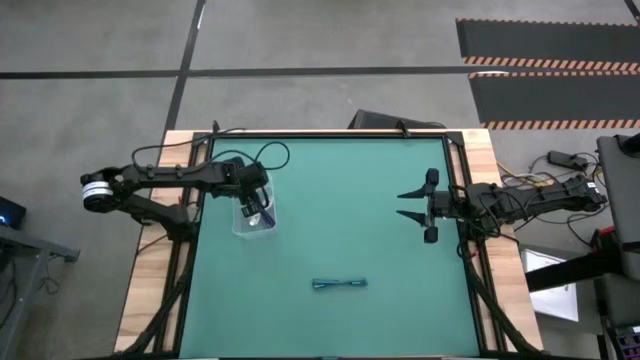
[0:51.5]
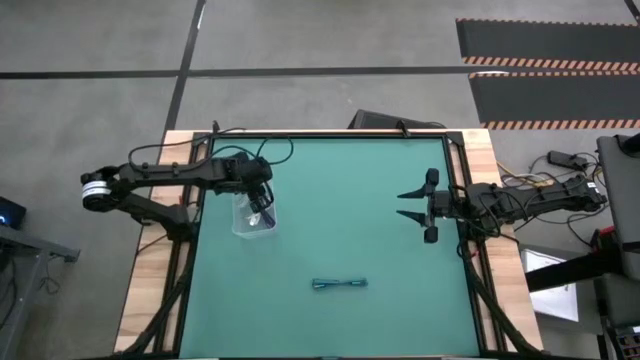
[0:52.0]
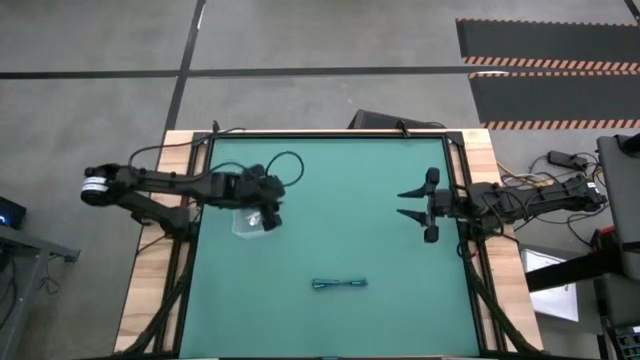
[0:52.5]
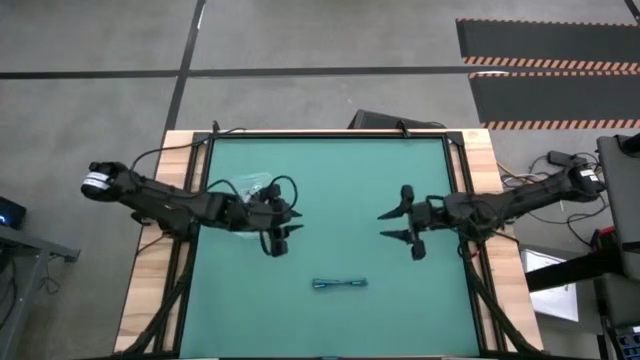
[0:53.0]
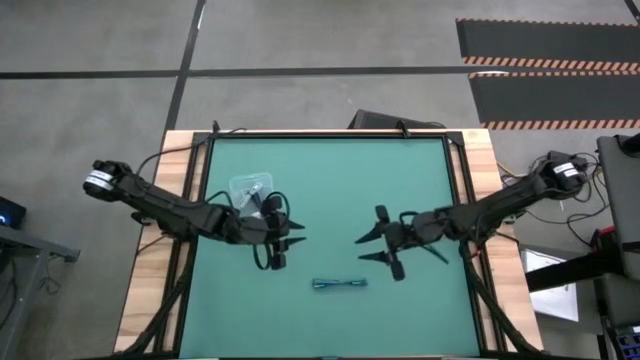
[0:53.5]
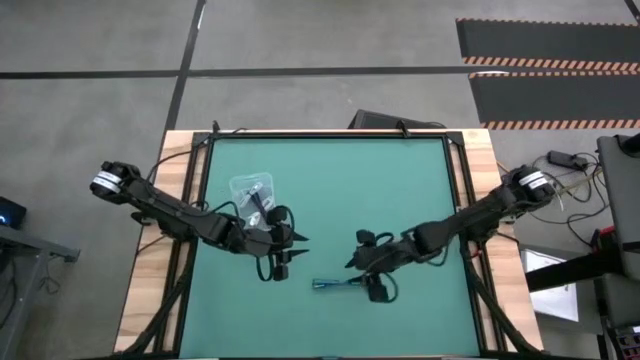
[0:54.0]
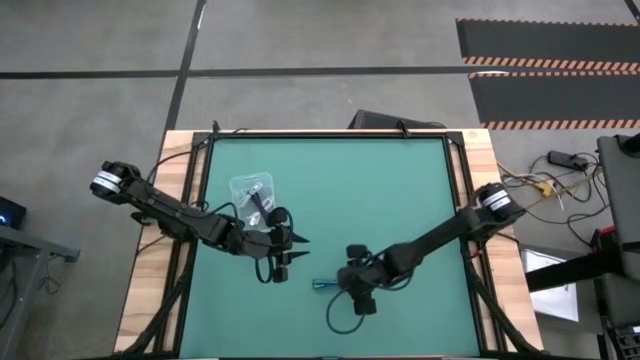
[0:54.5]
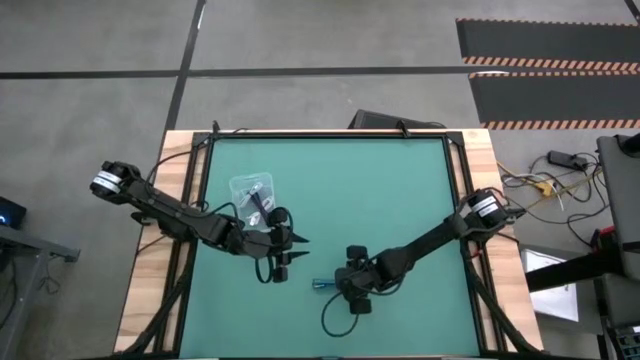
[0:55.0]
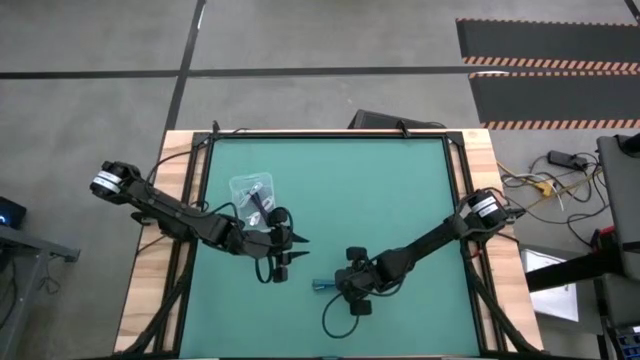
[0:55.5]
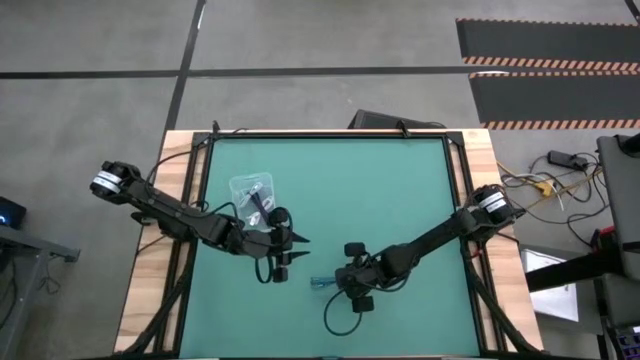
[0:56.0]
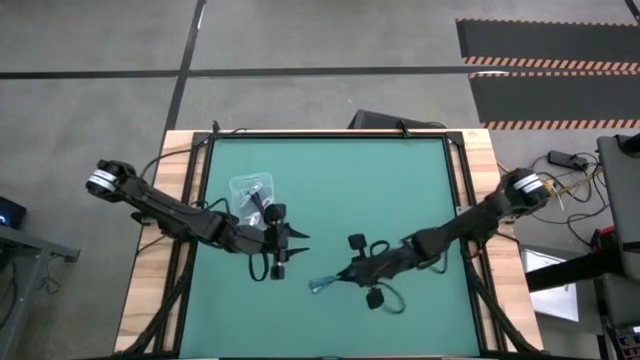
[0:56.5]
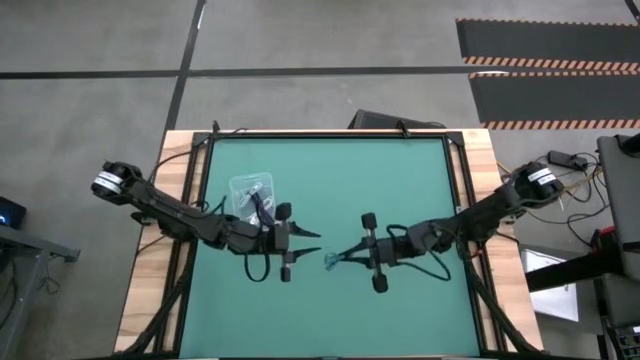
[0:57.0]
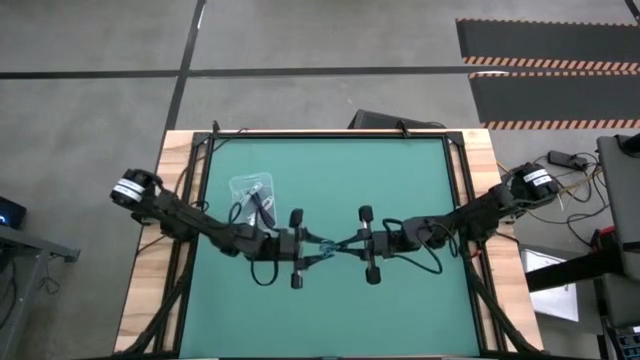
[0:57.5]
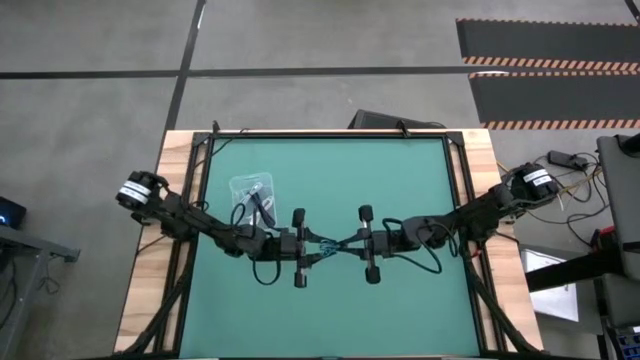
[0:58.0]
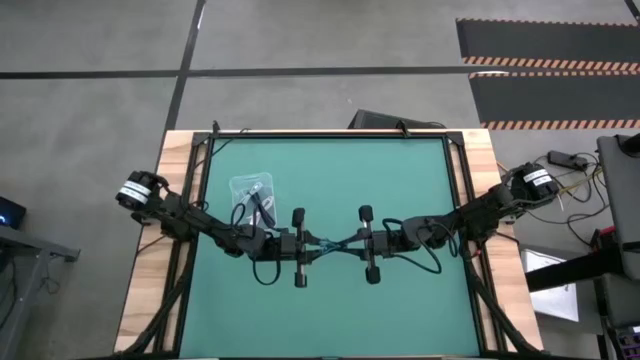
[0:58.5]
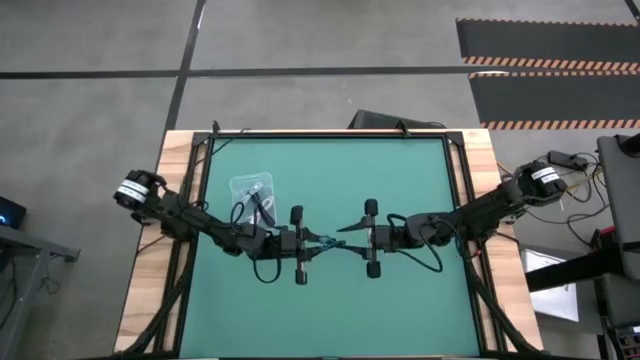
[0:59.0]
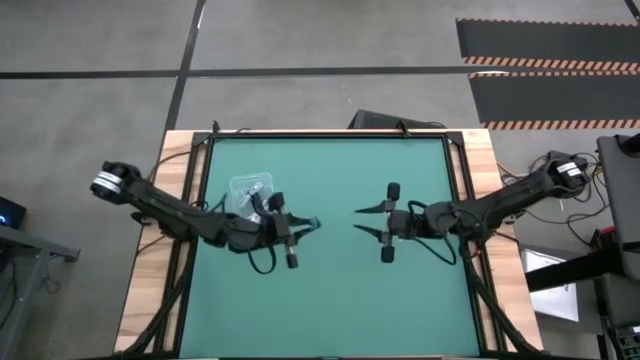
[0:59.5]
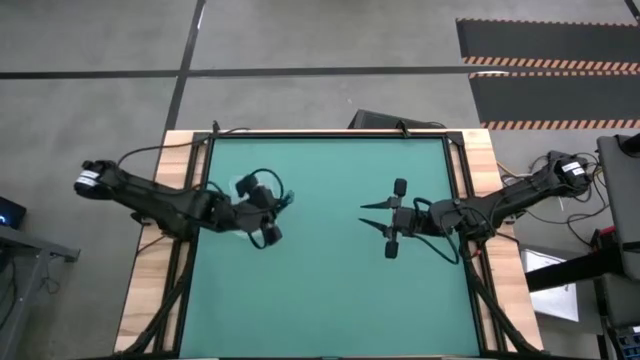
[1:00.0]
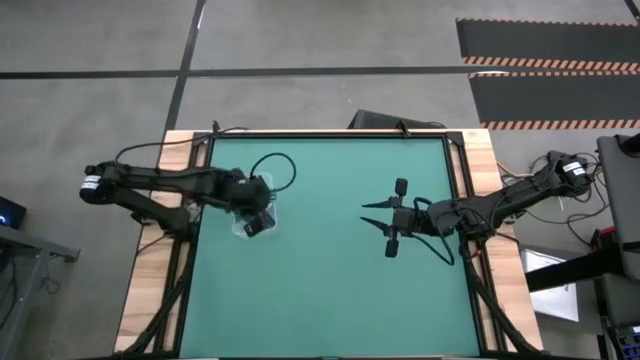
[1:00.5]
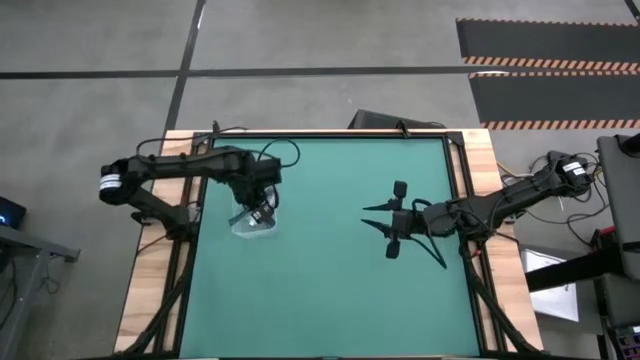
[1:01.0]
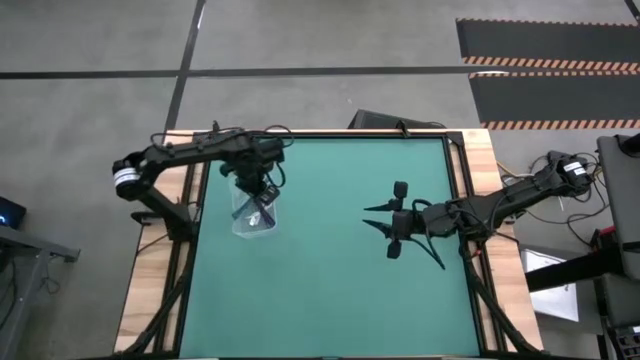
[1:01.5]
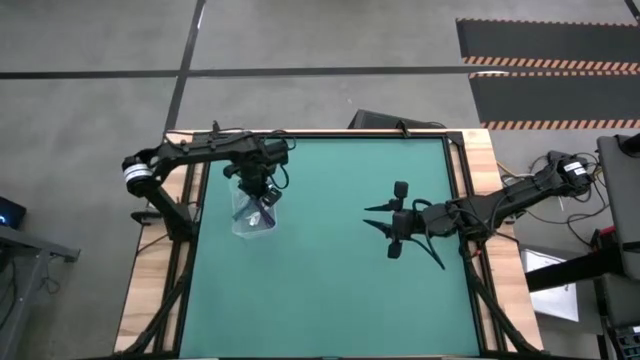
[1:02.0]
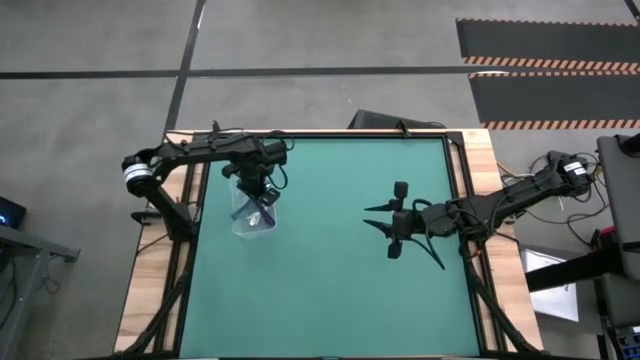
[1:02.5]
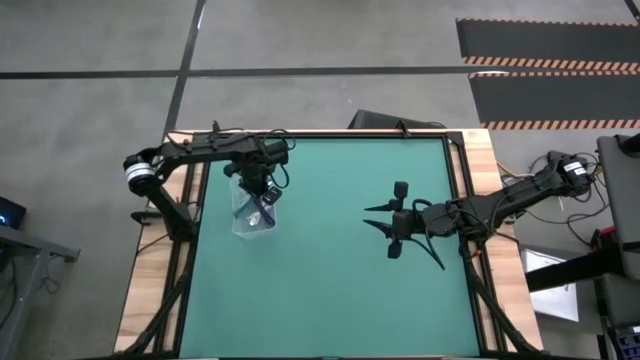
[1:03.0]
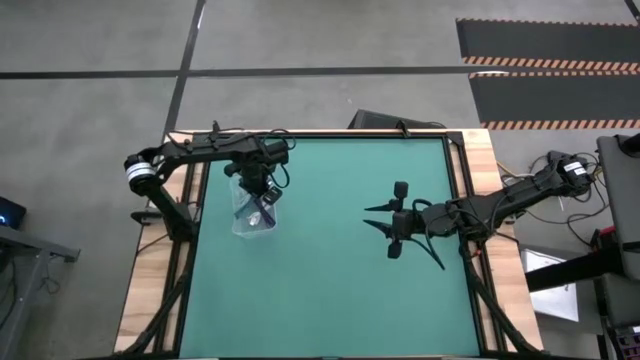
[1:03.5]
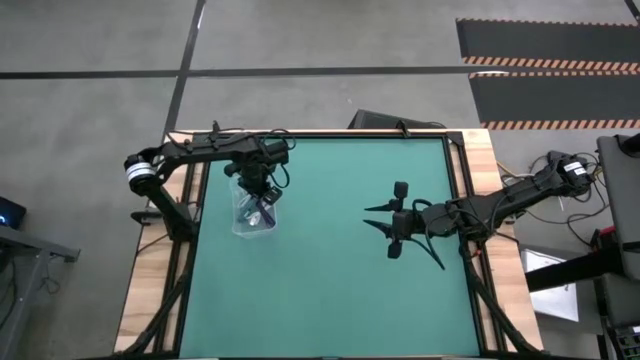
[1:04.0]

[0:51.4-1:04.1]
Task: Pick and place USB-C Cables
Put the blue charger cable into the transparent bin

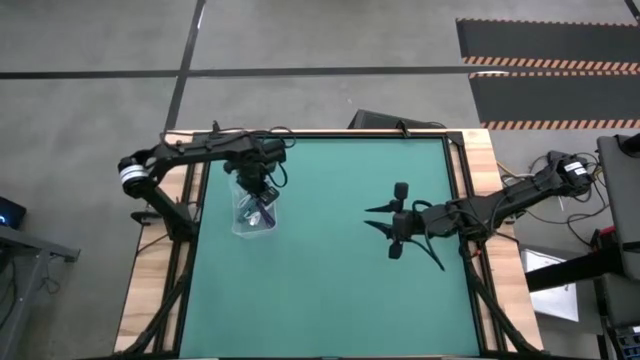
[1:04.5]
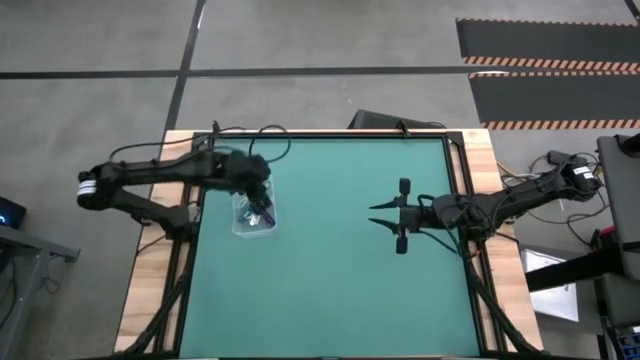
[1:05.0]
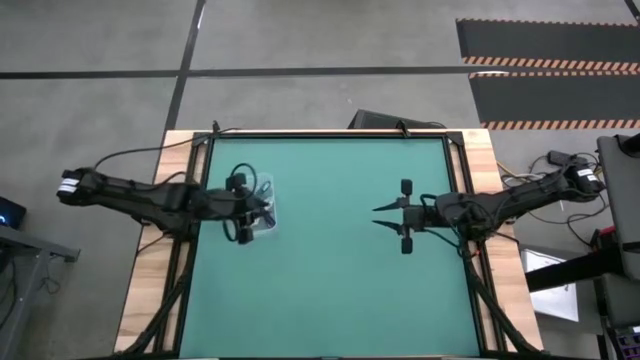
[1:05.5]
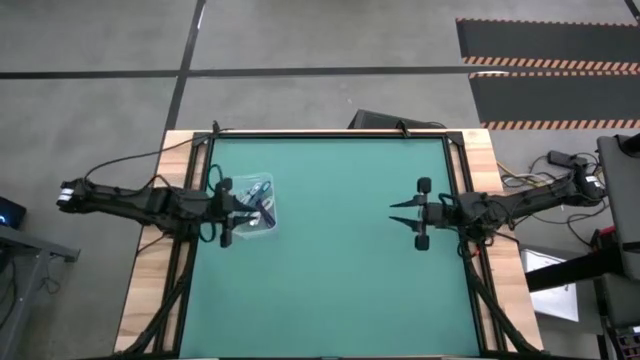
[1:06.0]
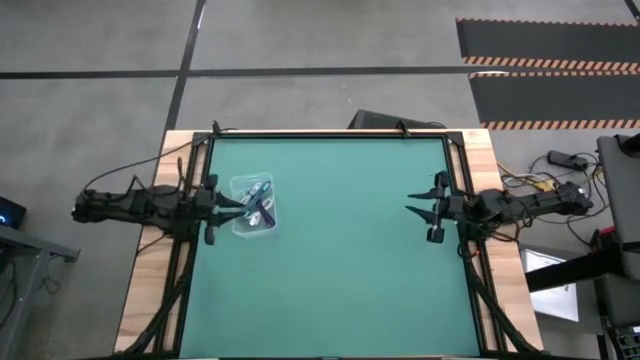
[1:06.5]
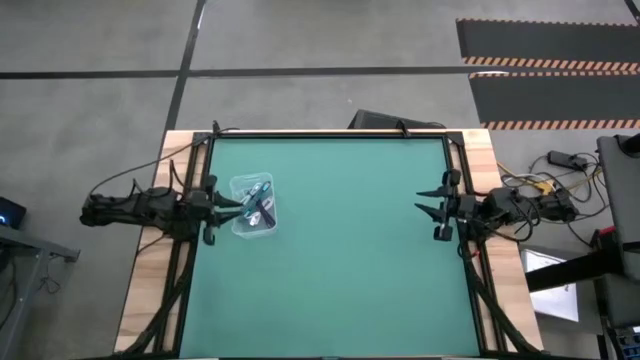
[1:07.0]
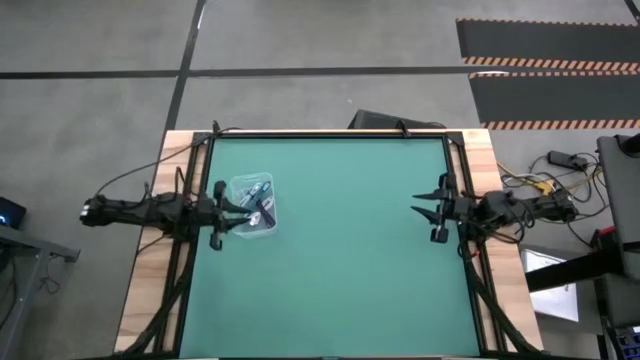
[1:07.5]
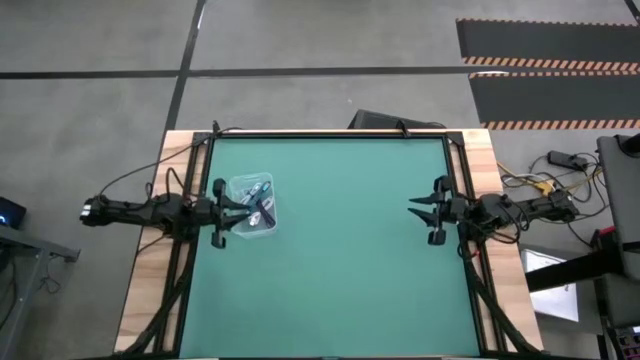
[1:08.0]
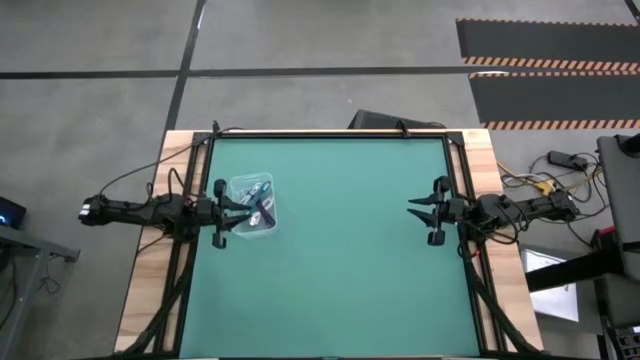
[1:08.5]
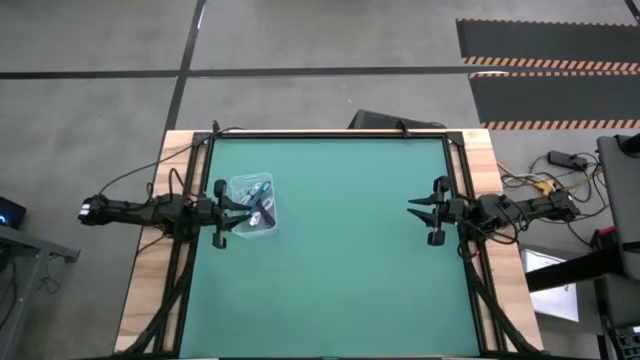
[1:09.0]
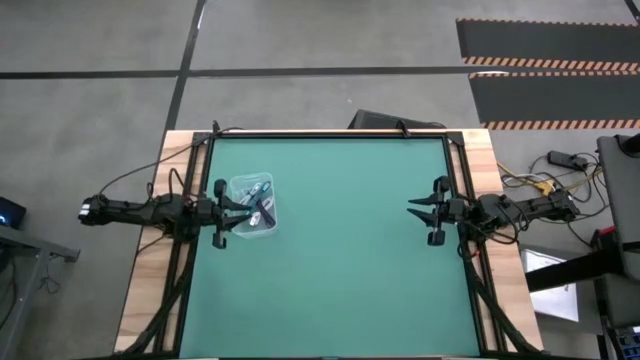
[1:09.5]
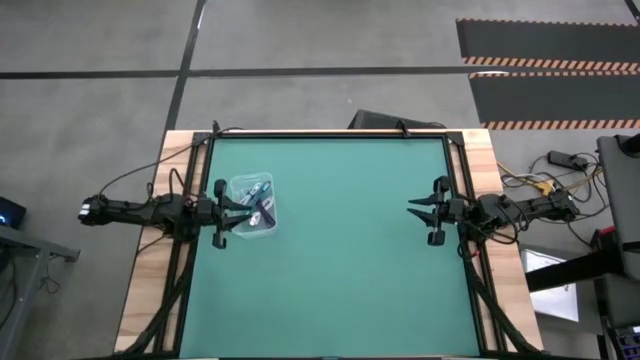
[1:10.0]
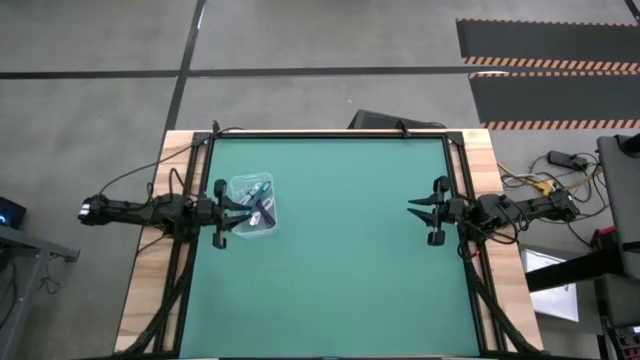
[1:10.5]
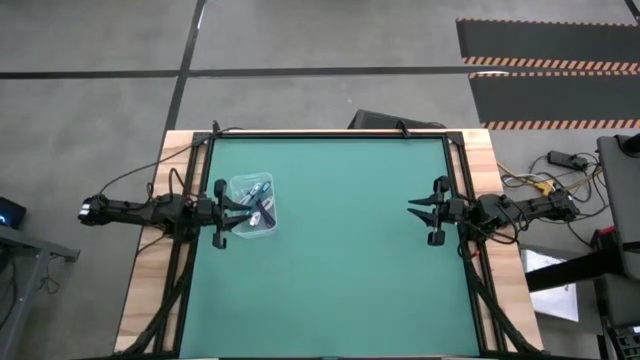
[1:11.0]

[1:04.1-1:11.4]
Return to Home Position
